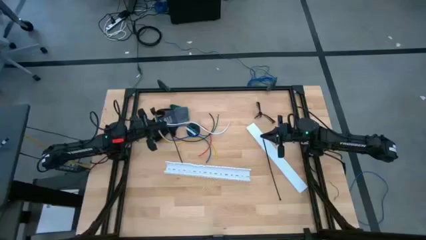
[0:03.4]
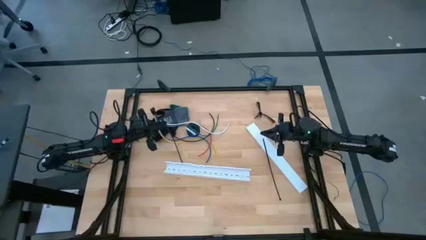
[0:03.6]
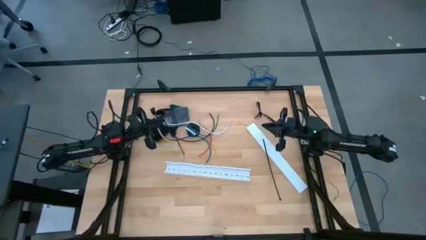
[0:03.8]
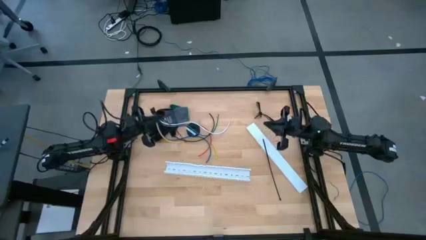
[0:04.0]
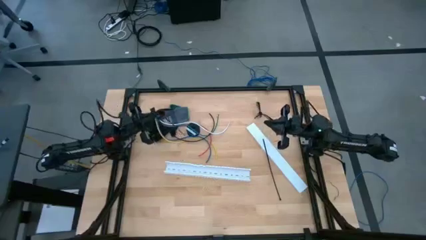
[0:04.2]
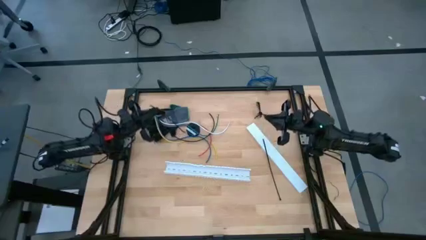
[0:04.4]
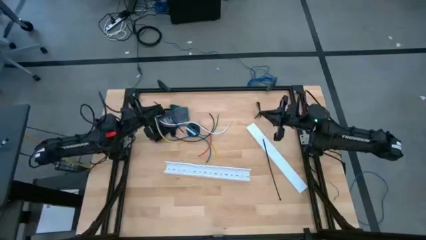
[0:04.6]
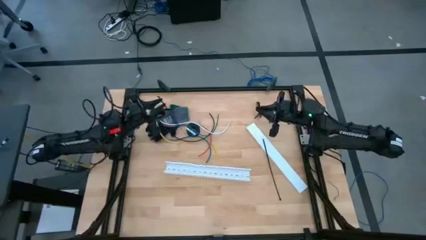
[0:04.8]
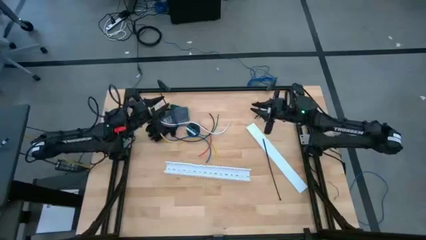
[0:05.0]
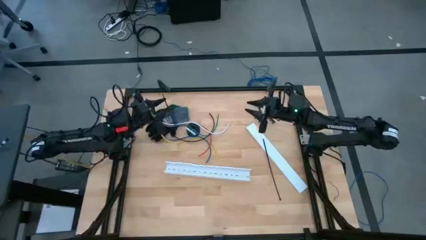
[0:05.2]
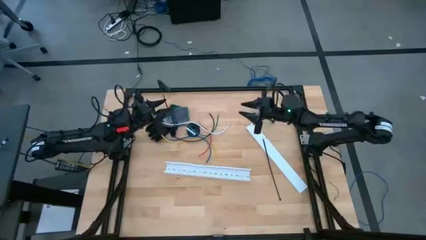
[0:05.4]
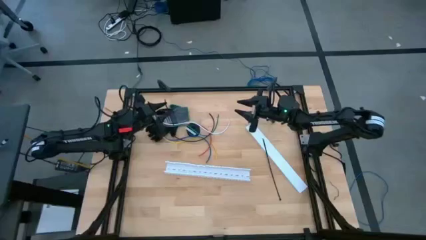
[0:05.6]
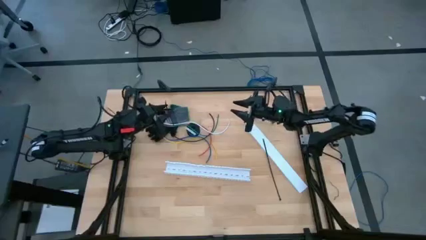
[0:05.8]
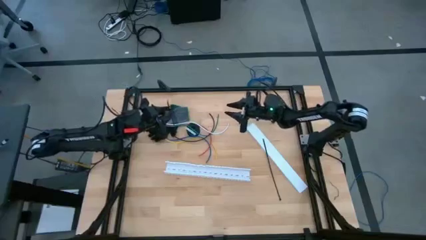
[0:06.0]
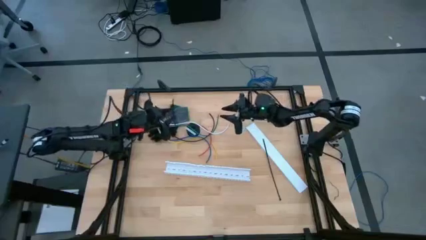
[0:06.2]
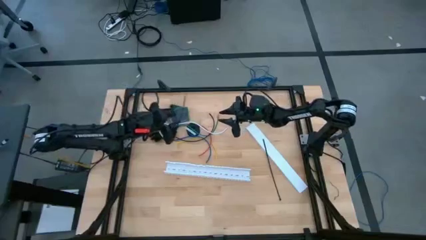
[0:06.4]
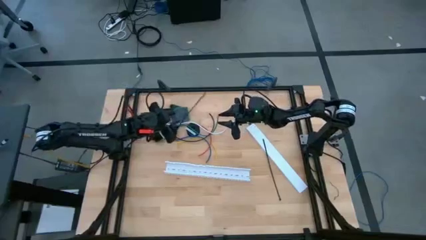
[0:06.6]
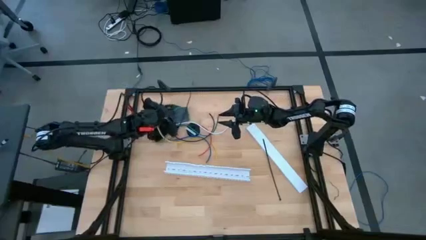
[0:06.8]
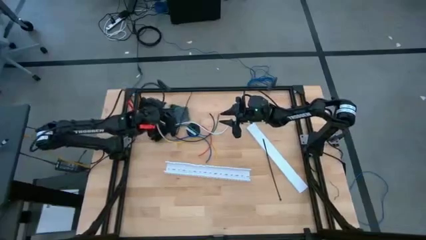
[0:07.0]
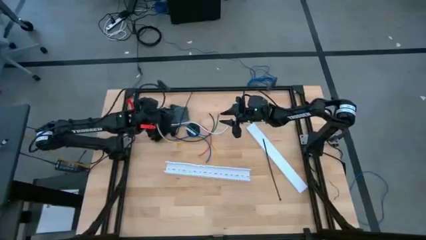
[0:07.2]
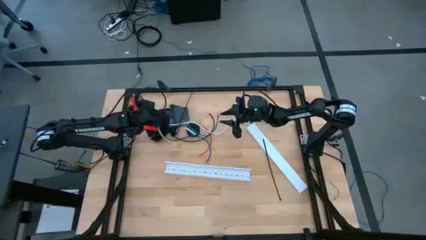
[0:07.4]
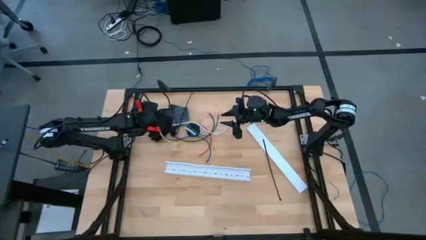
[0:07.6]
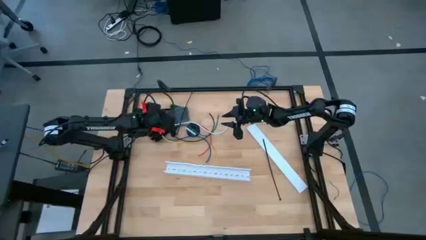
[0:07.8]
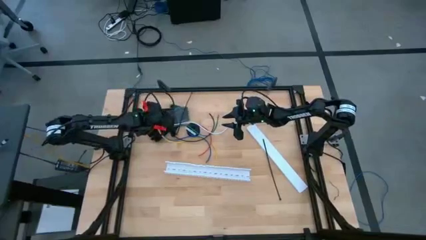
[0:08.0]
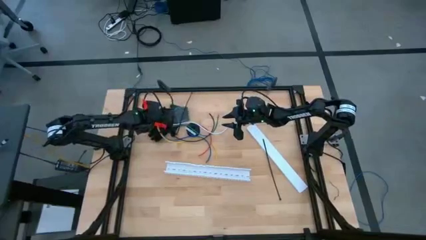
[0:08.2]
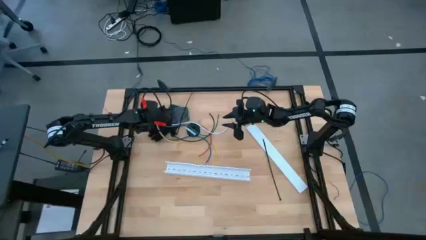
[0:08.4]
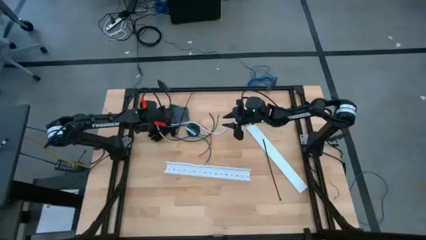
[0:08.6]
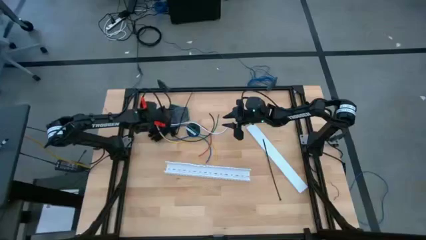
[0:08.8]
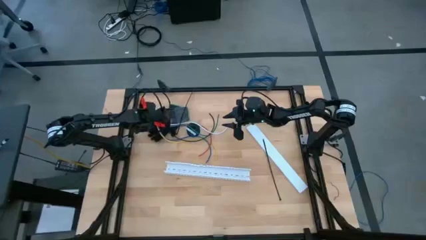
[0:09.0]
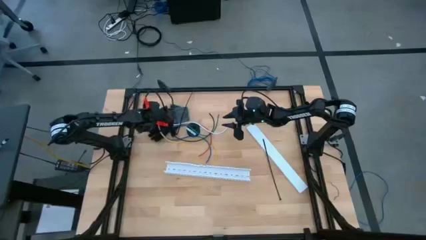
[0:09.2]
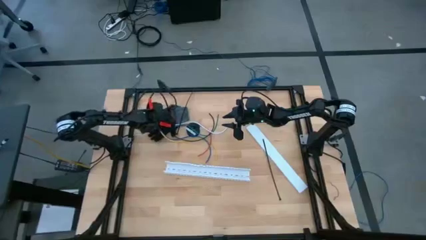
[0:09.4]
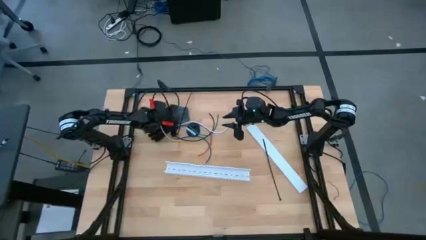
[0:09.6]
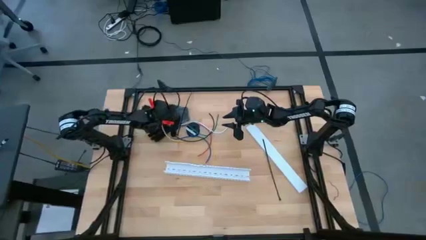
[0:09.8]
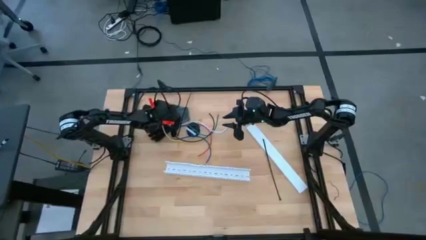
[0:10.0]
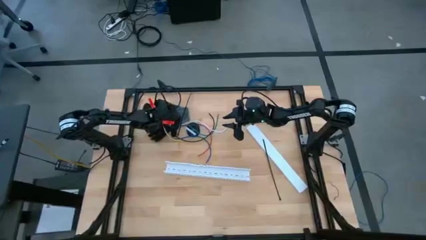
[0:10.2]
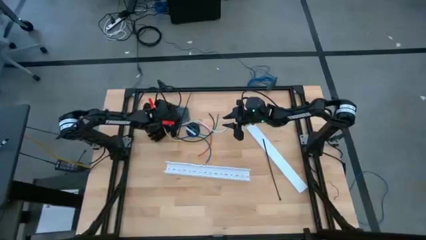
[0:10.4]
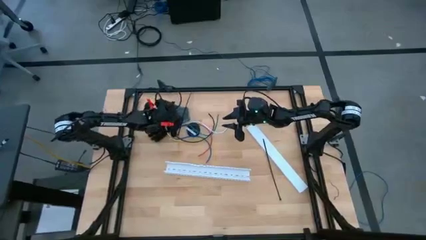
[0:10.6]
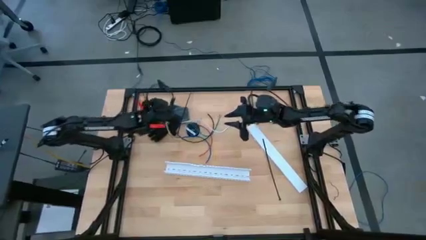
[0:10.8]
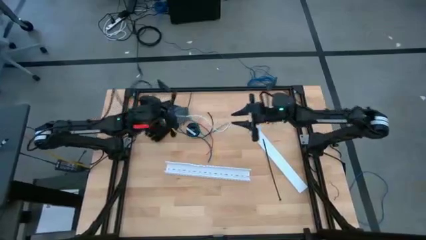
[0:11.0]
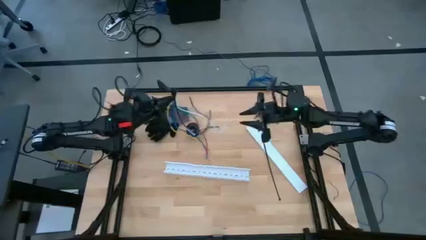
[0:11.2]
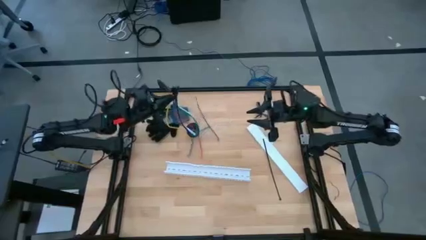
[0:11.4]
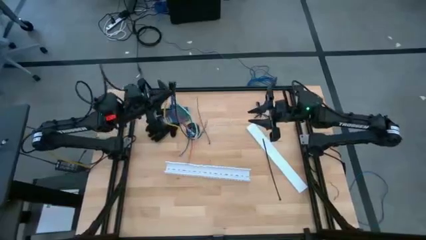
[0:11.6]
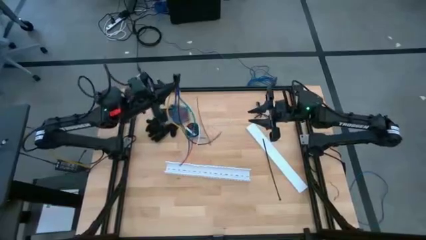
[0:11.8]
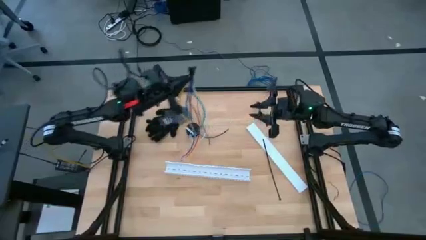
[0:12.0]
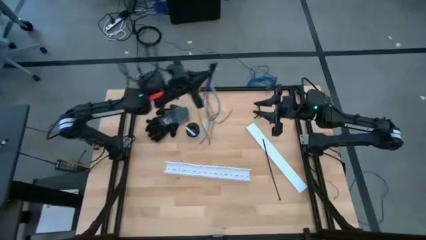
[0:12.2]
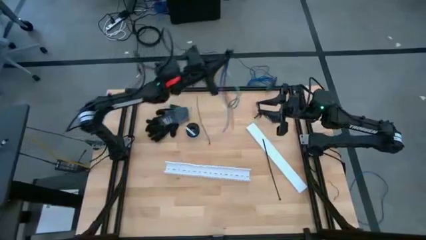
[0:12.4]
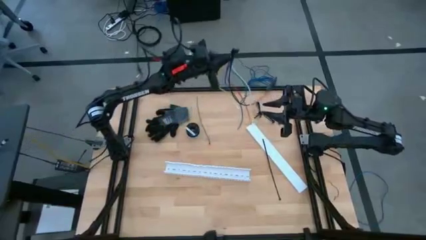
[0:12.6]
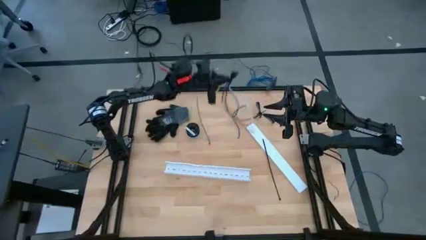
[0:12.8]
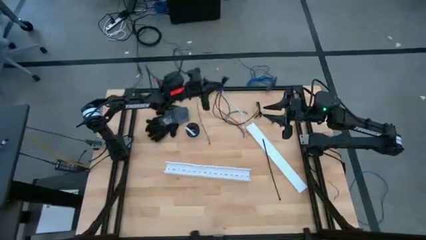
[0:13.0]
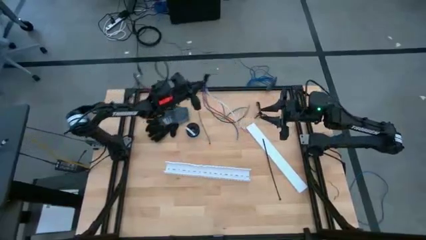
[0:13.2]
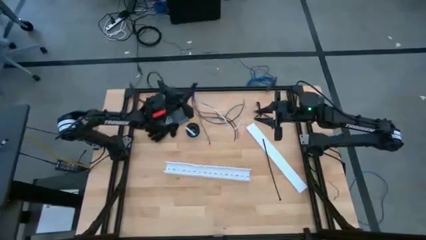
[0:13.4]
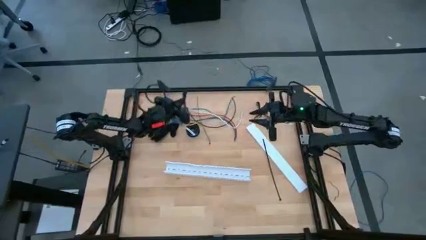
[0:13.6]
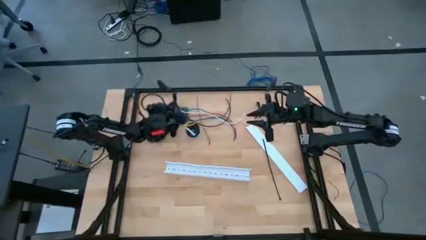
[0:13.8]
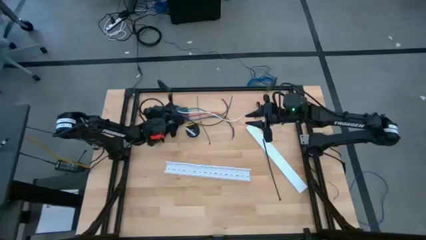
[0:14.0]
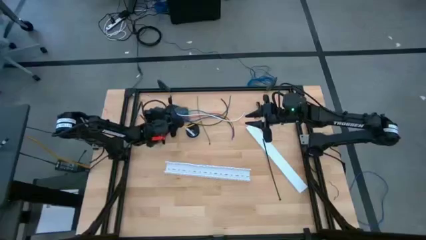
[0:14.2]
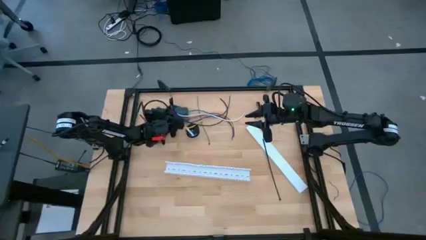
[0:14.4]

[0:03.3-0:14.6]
Task: Ziptie cables
Prepare the cable wires
